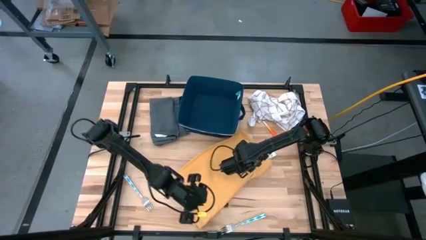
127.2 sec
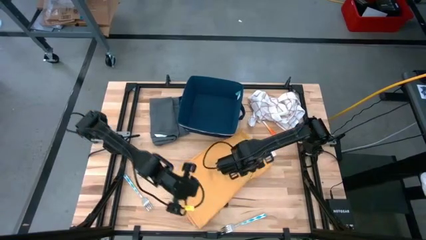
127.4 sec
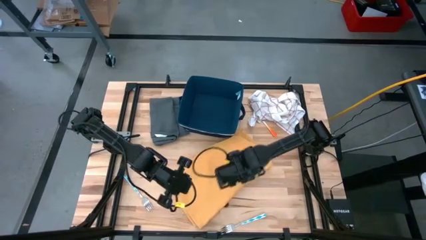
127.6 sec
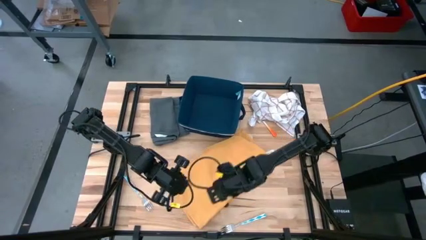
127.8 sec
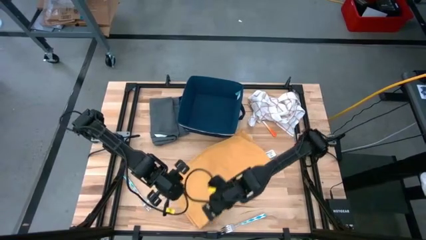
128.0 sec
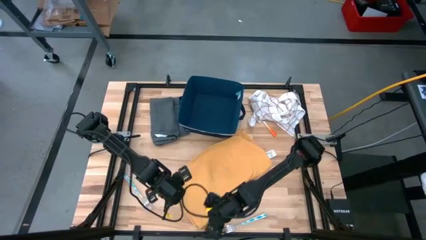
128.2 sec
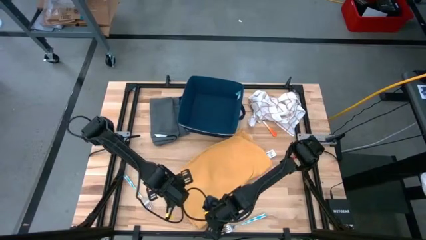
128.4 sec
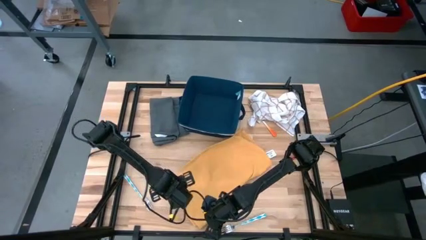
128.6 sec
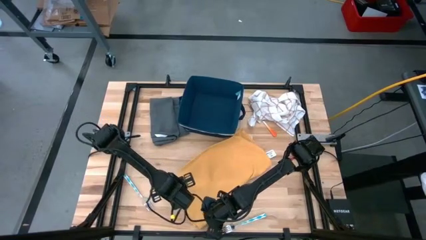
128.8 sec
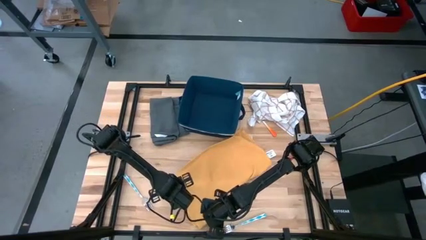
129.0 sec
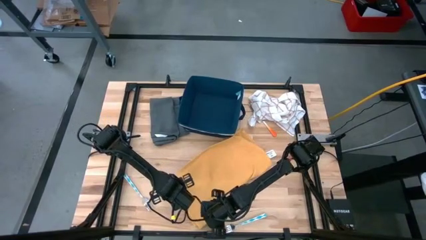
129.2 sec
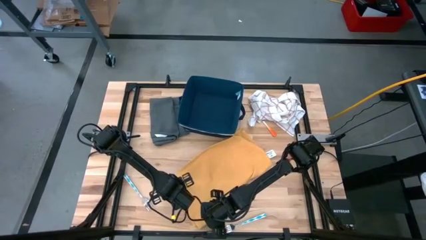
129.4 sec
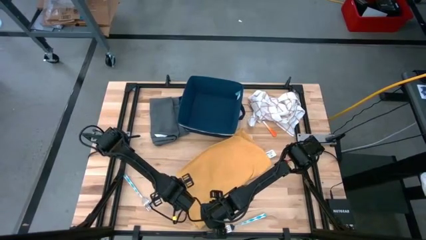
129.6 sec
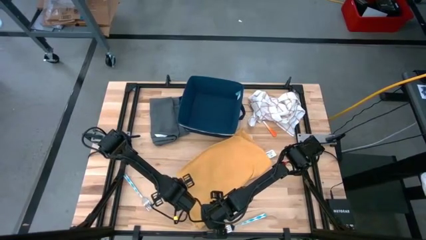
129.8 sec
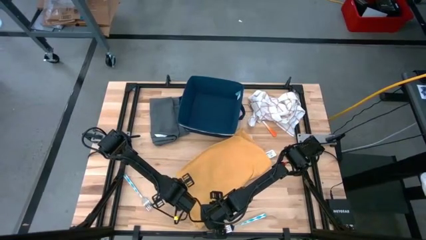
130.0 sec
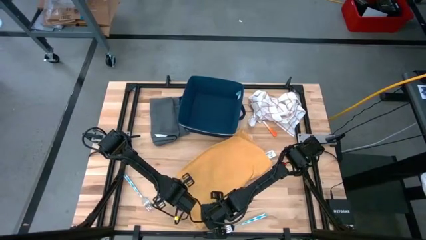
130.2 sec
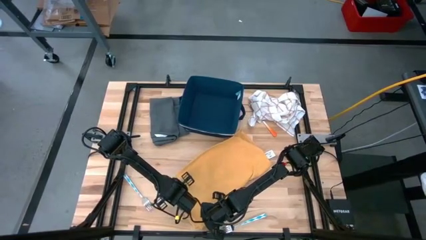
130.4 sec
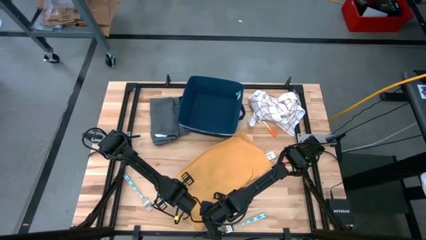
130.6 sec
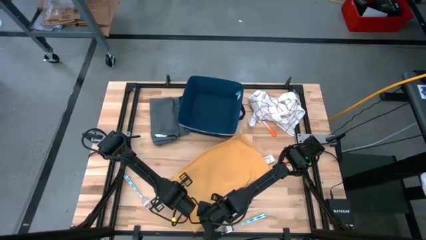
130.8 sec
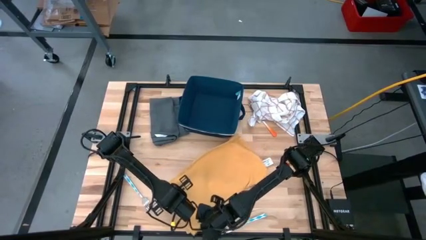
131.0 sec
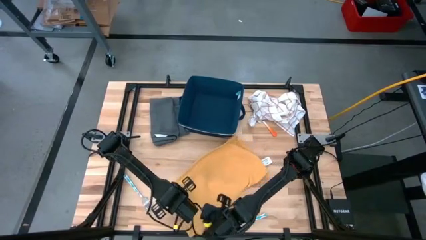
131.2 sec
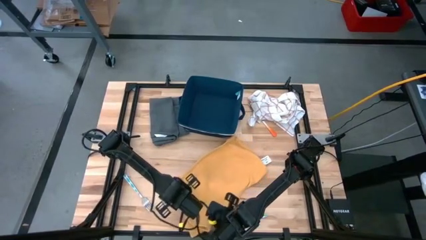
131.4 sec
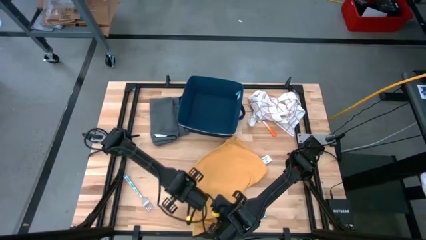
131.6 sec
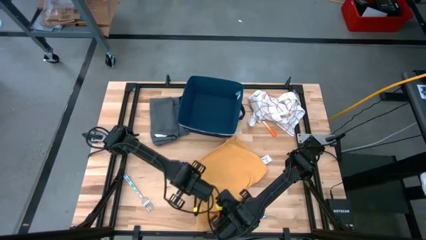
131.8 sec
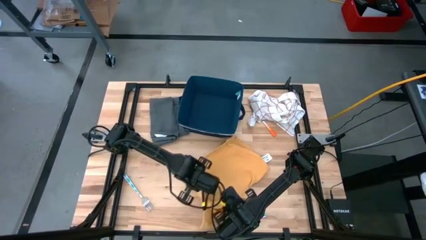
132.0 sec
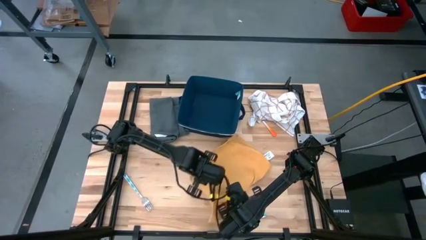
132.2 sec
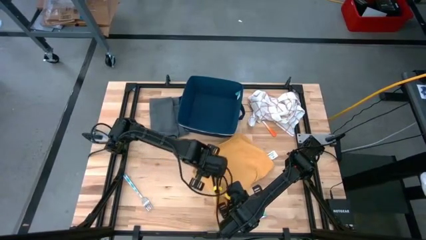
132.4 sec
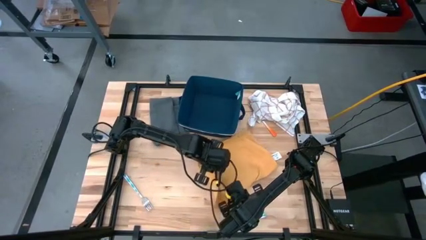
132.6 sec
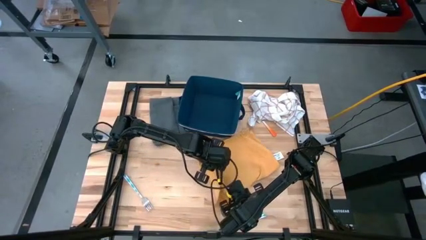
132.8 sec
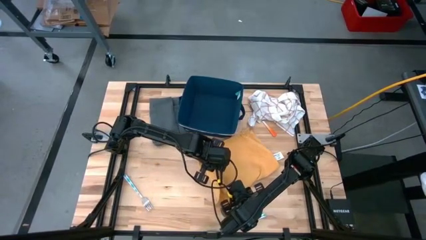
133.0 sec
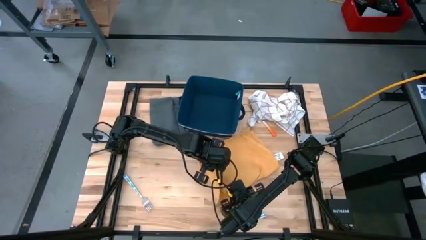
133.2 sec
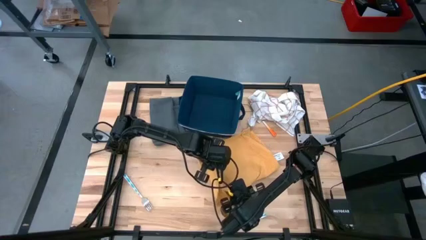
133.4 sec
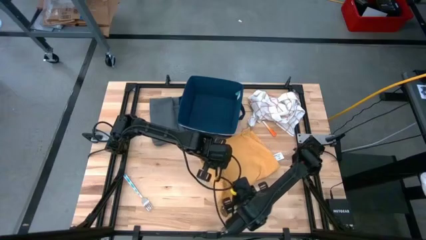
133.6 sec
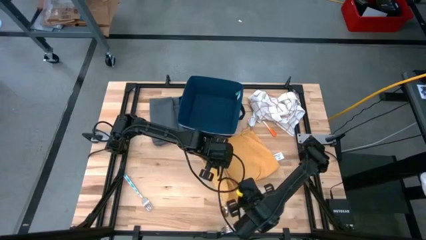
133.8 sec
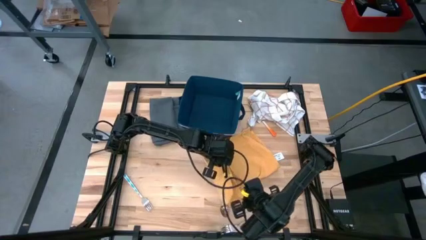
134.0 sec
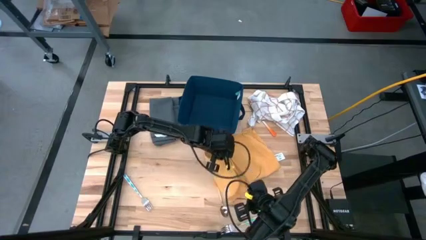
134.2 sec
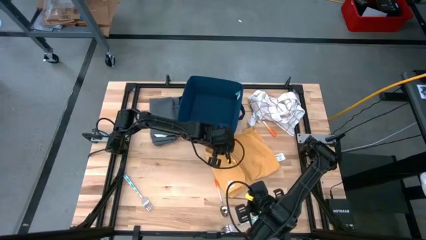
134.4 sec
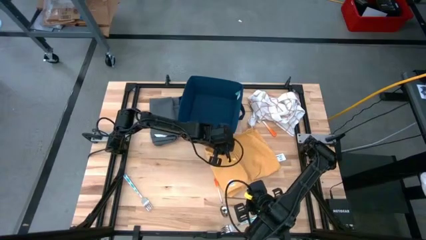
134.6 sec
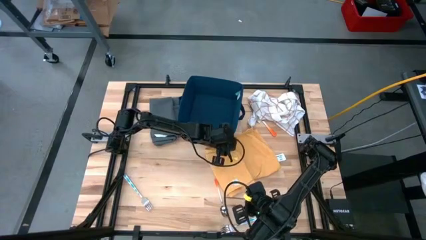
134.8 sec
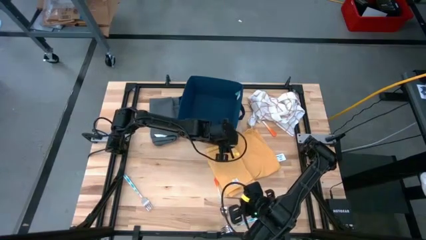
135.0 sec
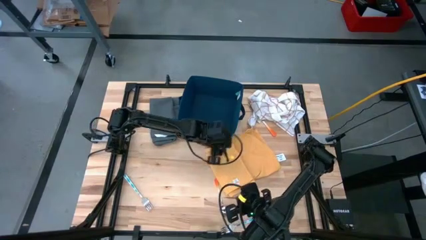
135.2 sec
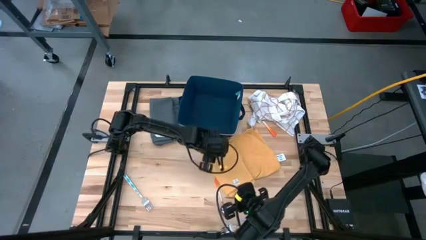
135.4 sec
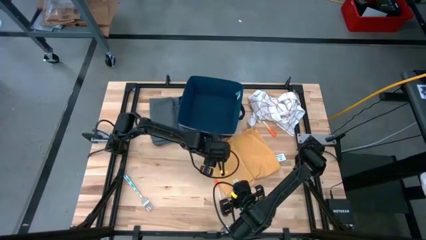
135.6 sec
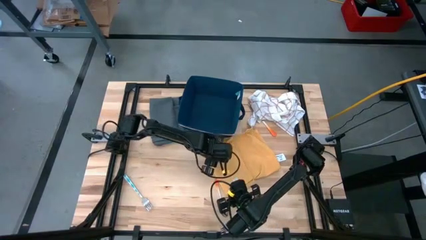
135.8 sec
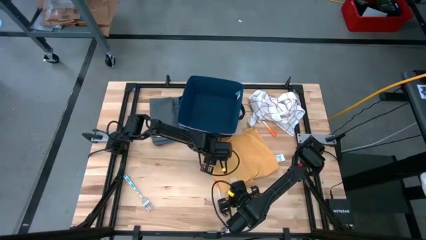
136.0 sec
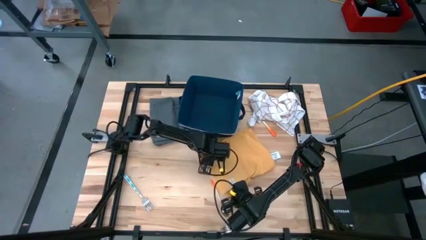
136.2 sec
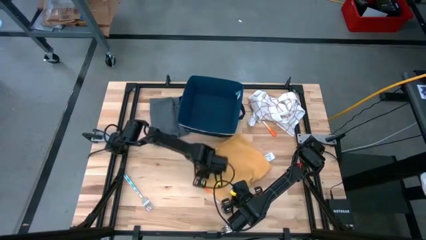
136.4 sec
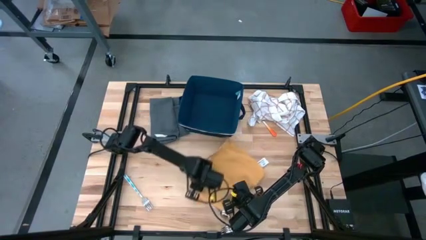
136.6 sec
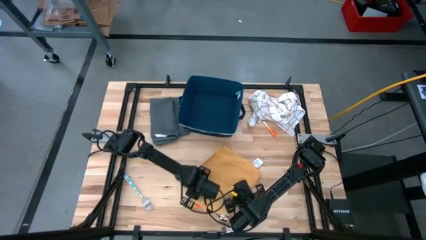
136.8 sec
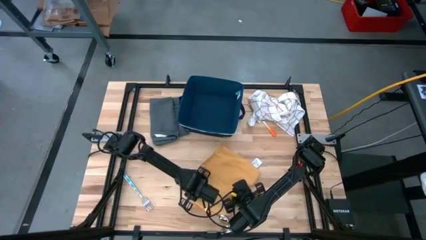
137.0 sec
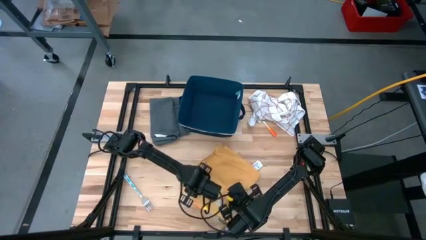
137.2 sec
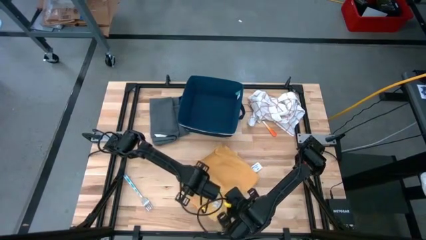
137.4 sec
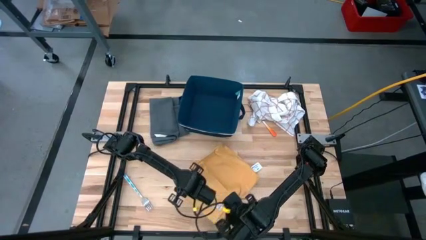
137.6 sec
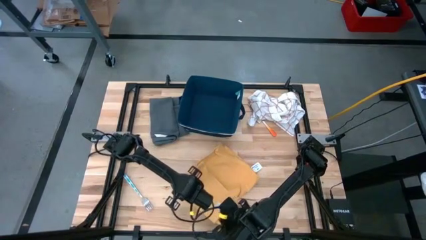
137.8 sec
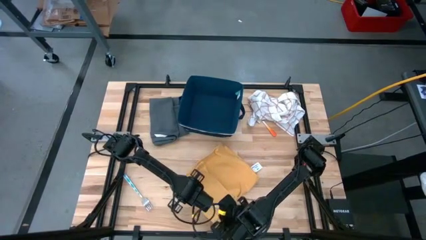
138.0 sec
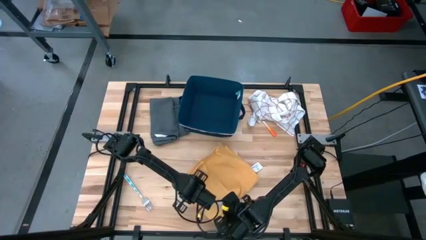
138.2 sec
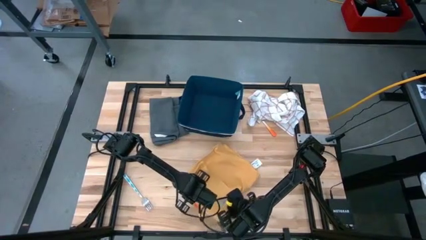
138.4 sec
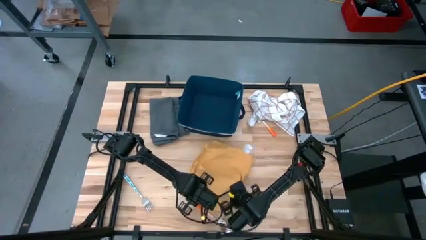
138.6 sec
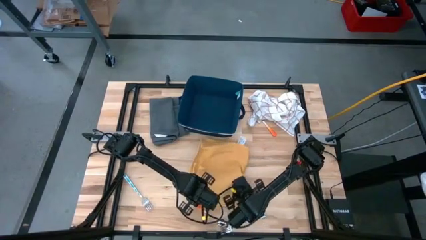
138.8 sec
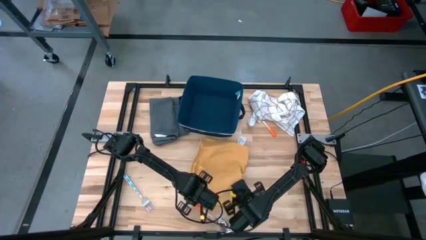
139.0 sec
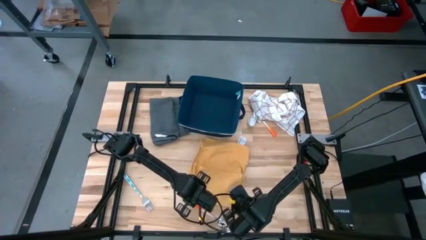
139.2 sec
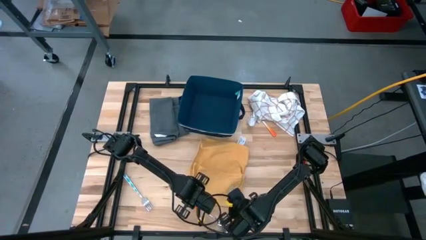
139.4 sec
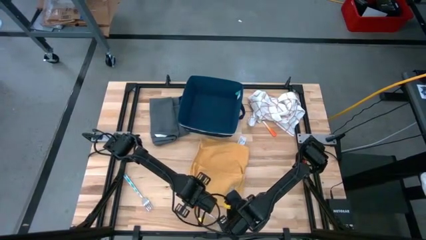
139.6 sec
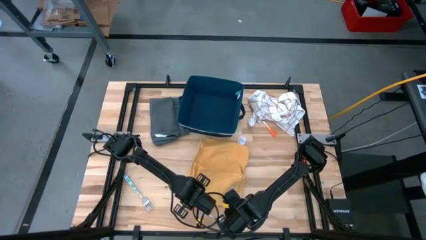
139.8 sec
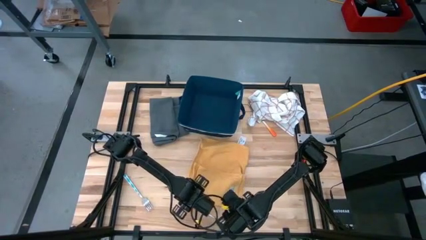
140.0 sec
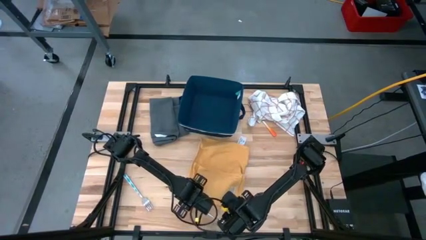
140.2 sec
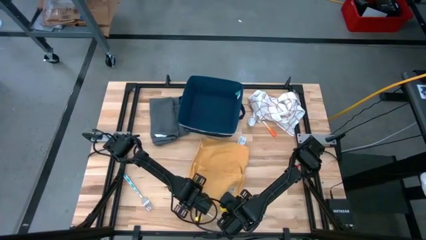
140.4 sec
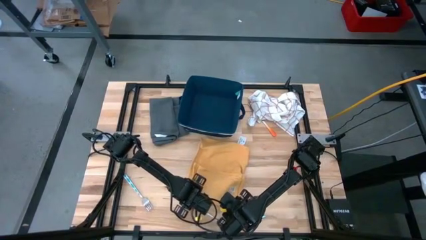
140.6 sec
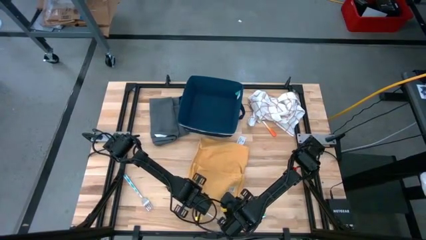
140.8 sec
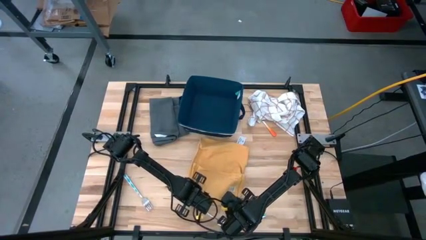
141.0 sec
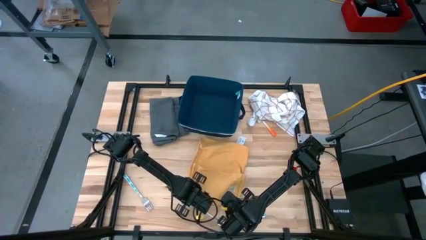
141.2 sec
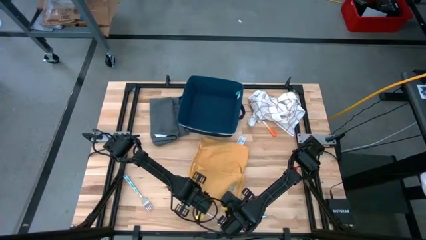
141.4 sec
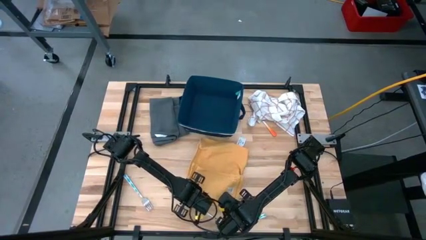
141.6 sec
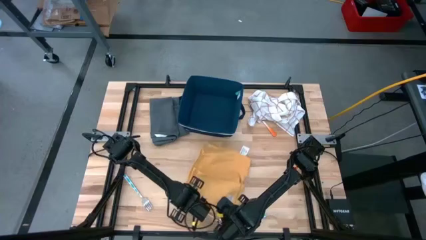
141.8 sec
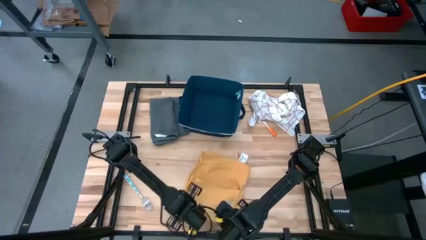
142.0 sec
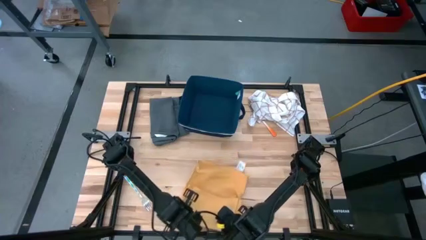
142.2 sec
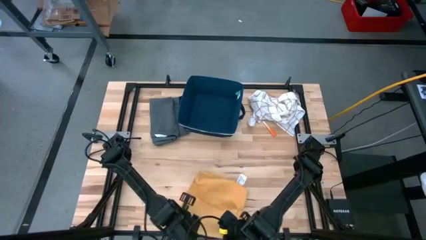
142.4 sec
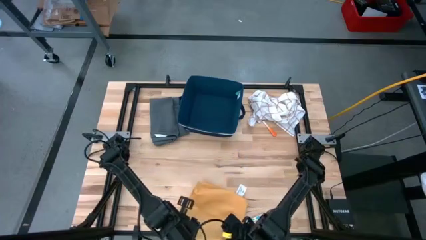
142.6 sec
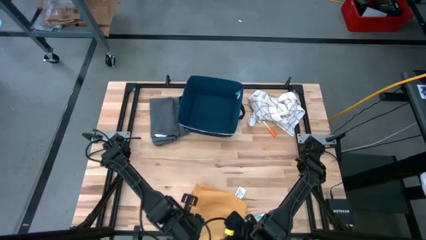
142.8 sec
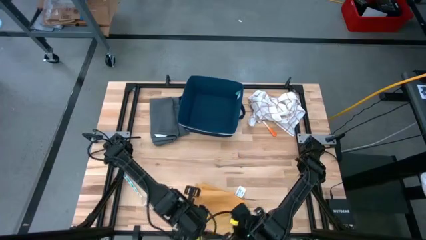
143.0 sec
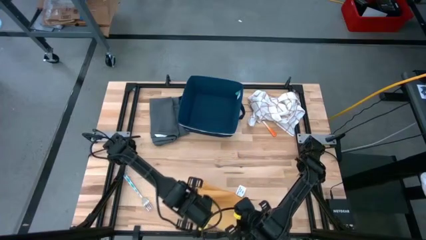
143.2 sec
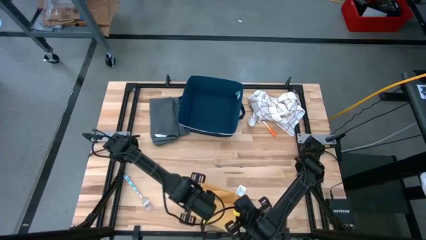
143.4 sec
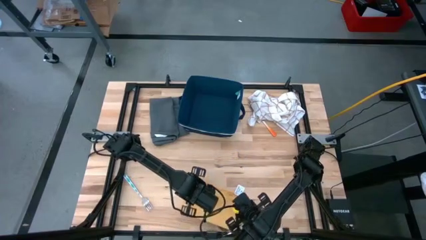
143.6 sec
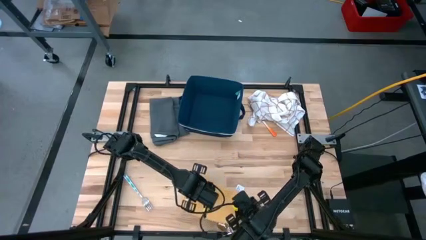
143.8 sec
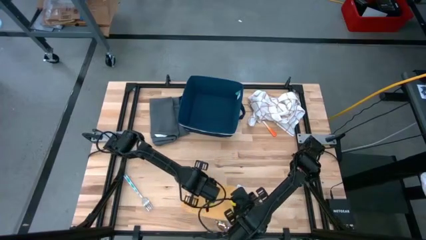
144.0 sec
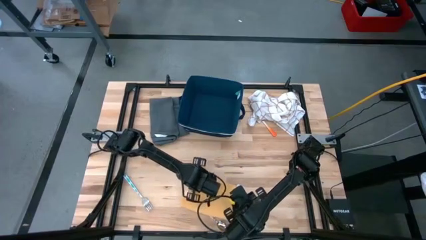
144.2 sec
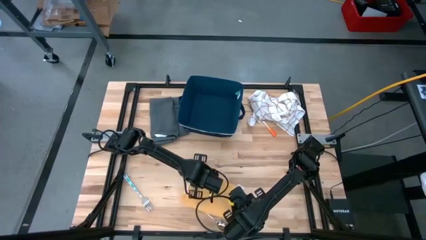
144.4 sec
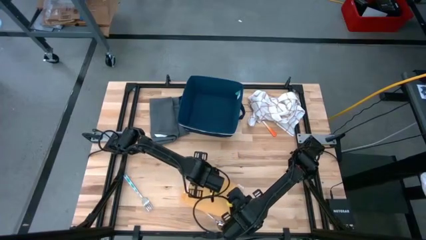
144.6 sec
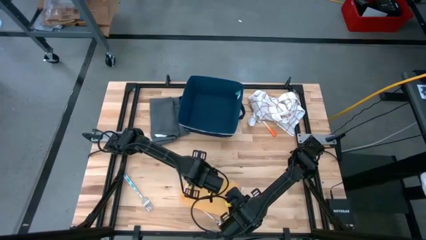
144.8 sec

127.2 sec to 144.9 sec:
Task: Fold towel
Fold the yellow towel
